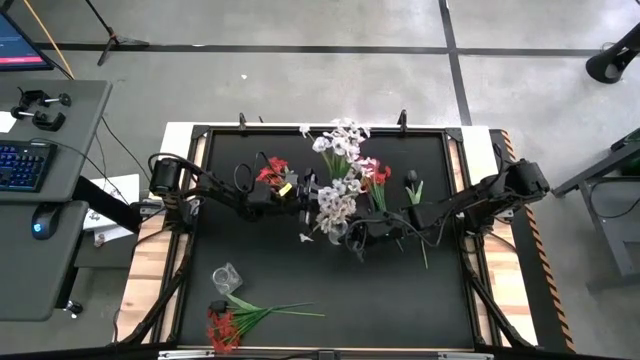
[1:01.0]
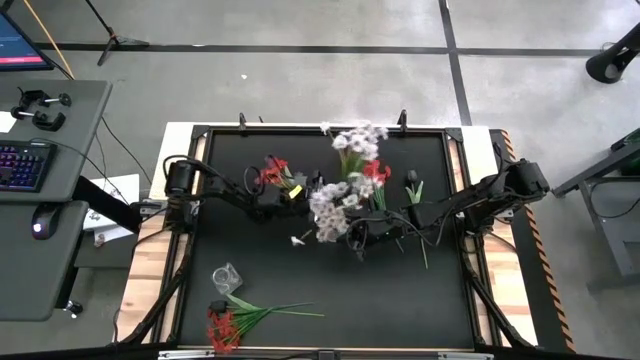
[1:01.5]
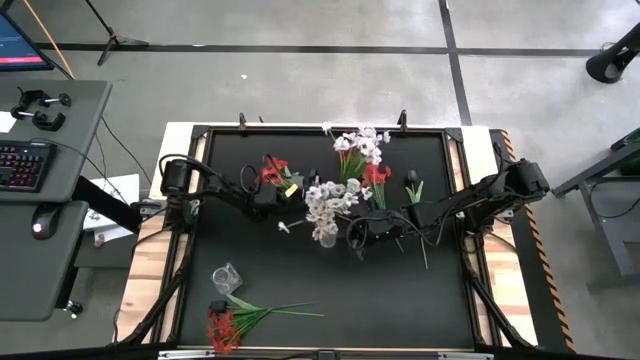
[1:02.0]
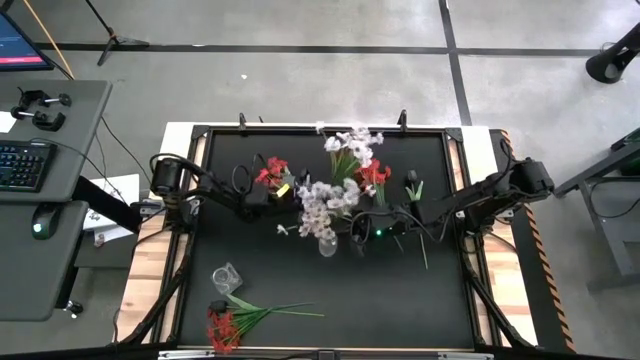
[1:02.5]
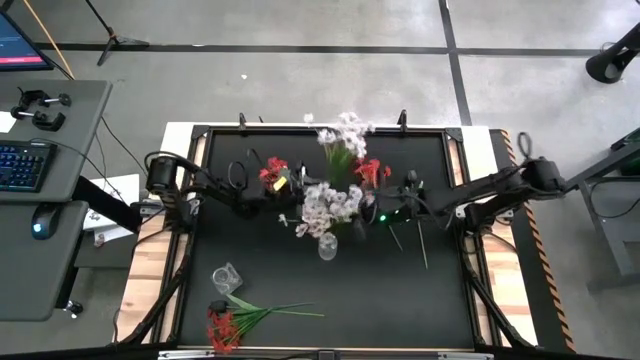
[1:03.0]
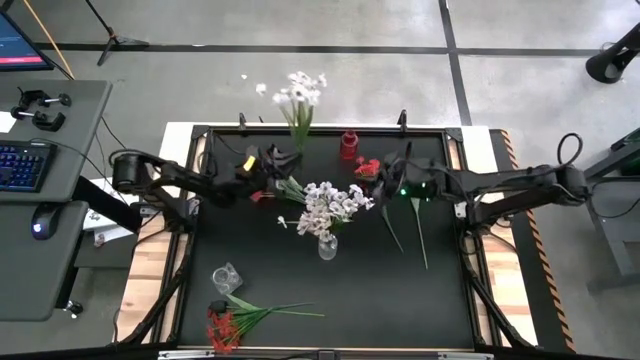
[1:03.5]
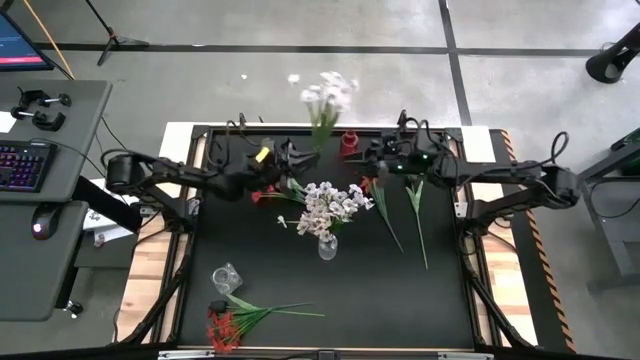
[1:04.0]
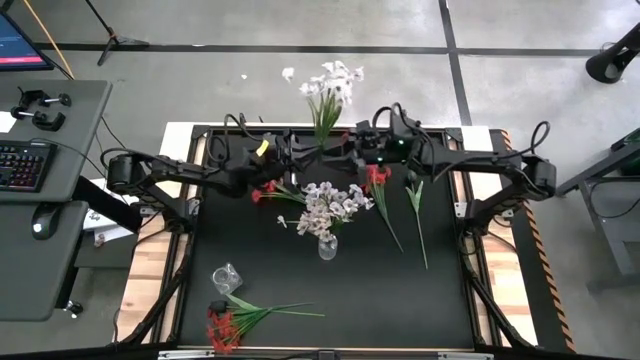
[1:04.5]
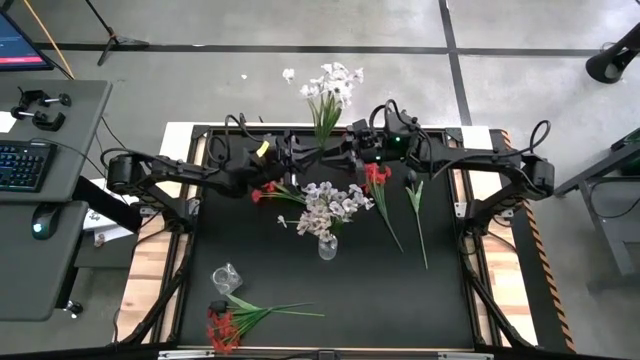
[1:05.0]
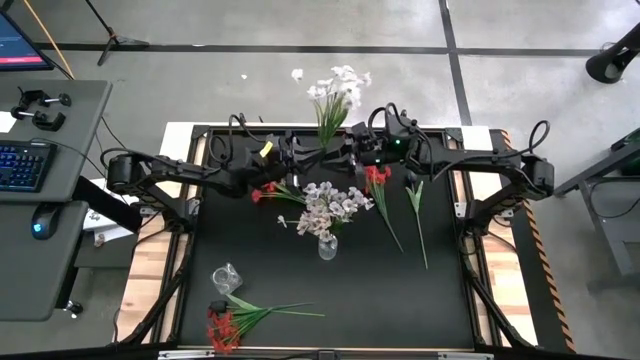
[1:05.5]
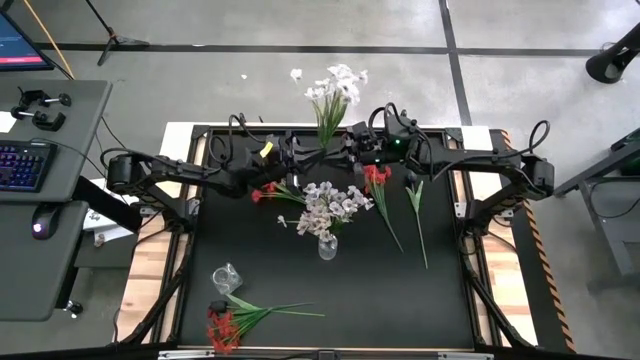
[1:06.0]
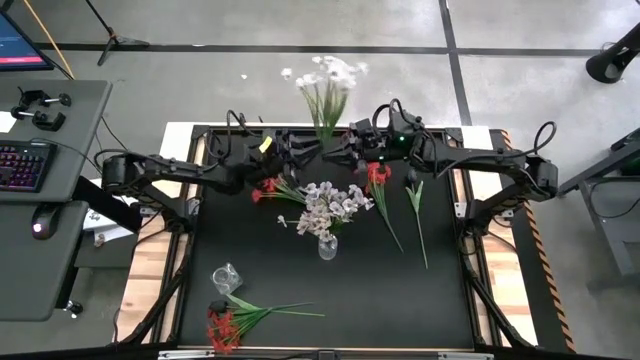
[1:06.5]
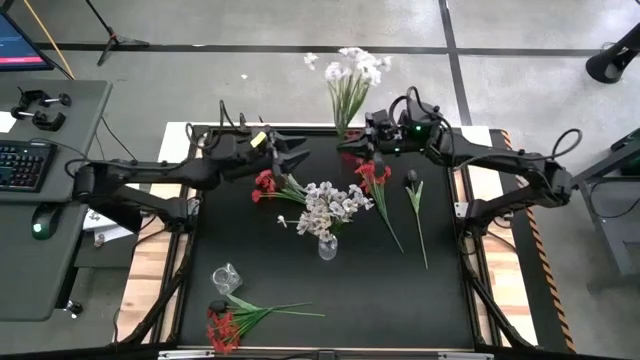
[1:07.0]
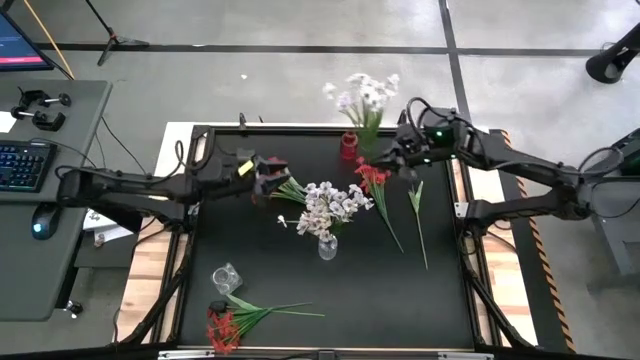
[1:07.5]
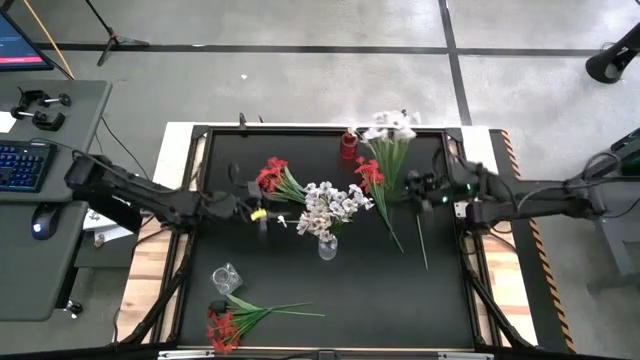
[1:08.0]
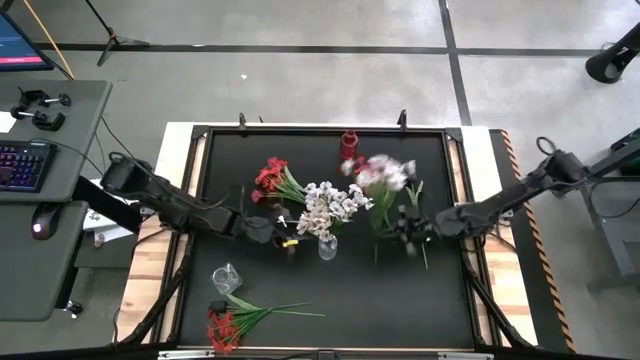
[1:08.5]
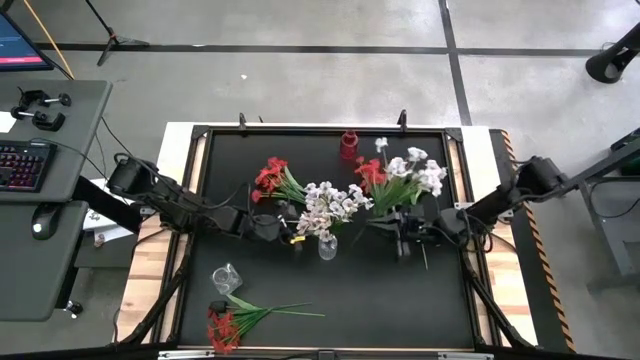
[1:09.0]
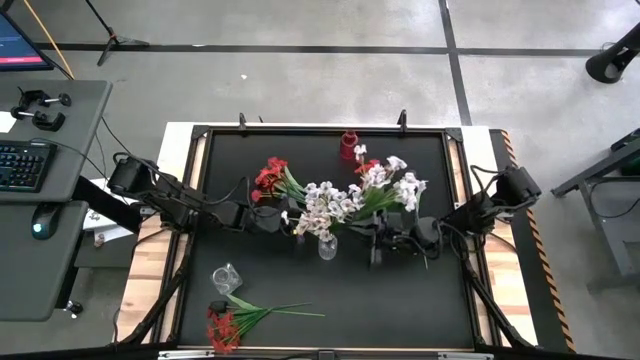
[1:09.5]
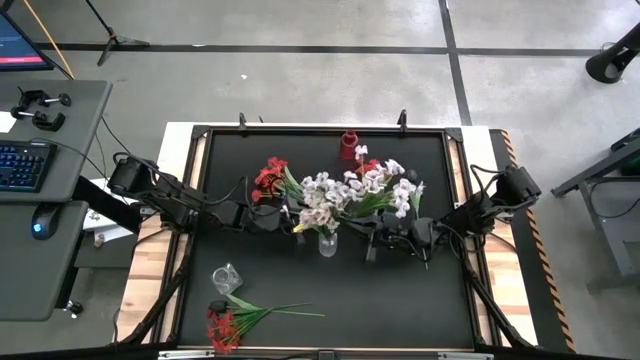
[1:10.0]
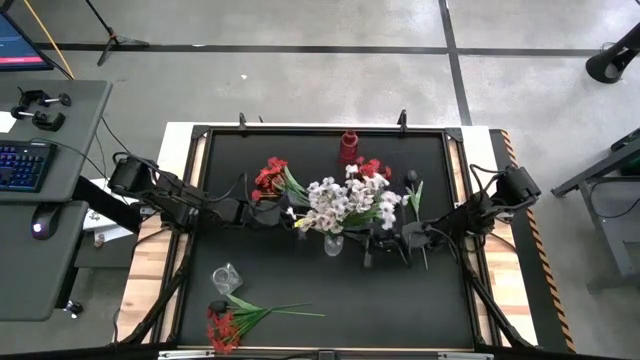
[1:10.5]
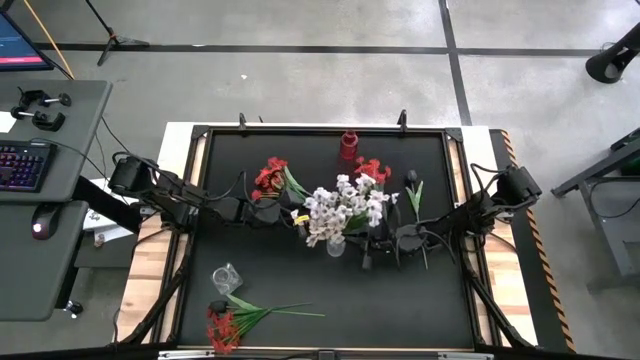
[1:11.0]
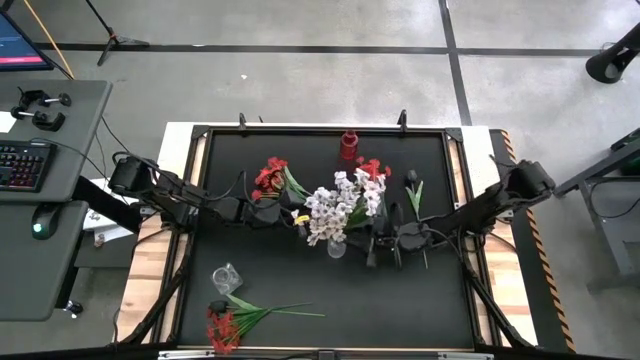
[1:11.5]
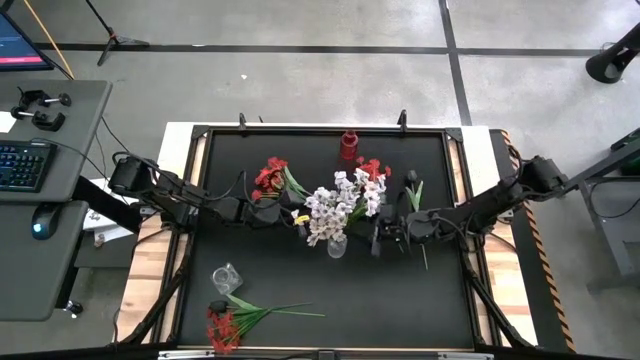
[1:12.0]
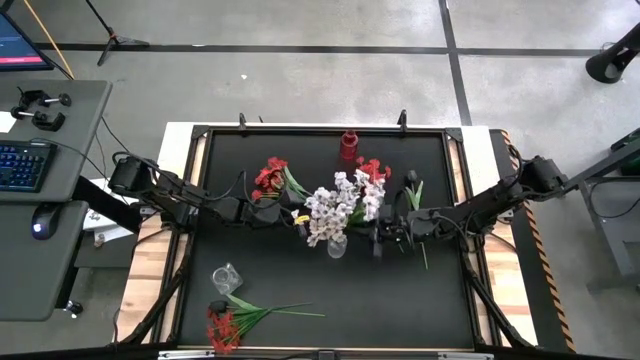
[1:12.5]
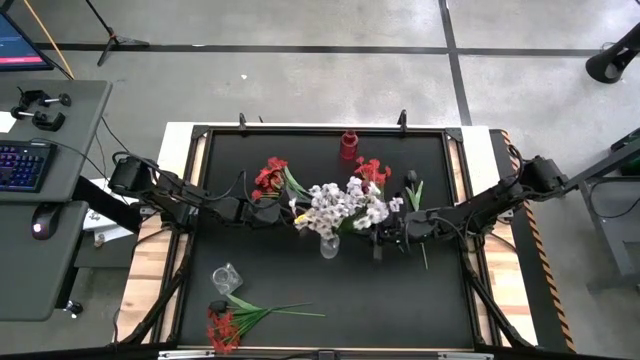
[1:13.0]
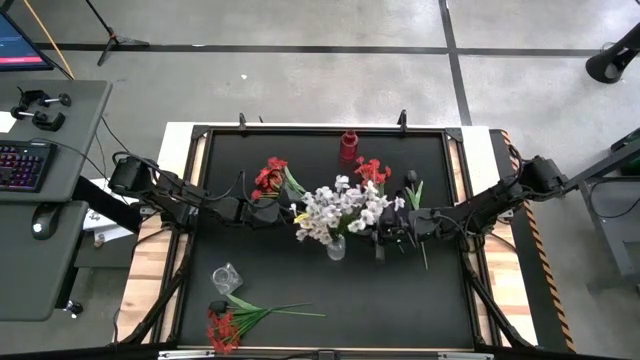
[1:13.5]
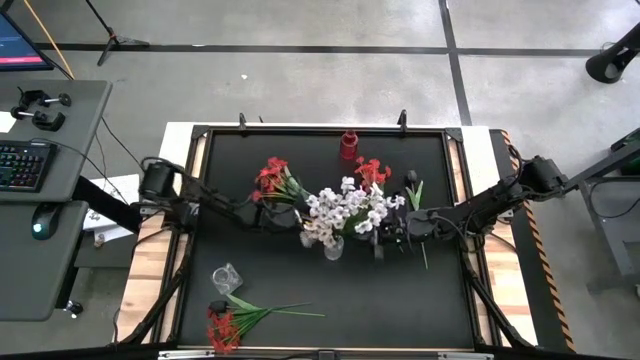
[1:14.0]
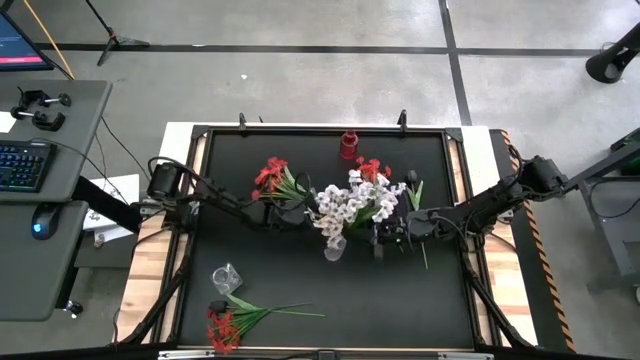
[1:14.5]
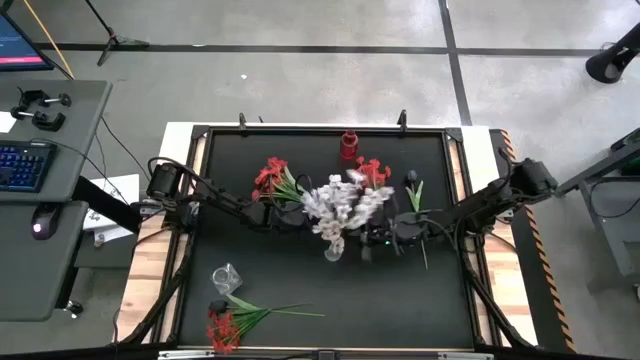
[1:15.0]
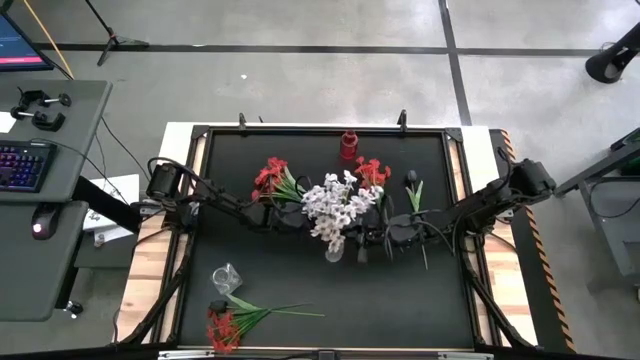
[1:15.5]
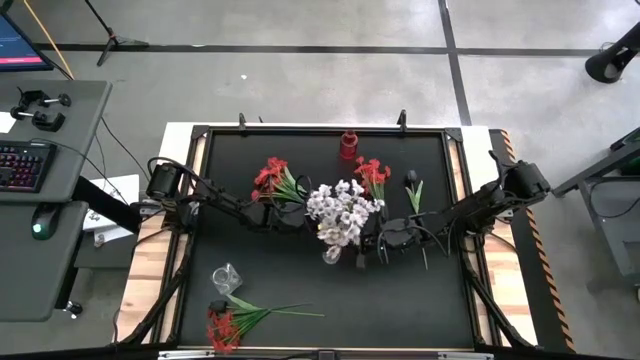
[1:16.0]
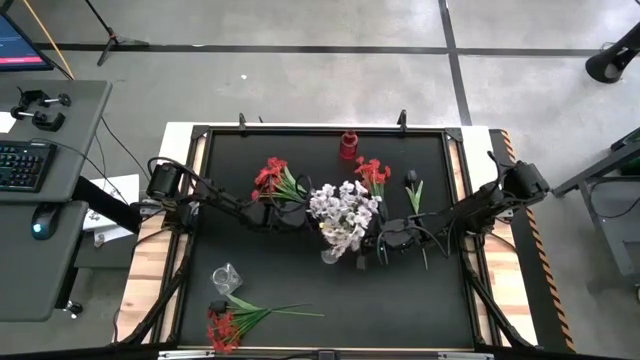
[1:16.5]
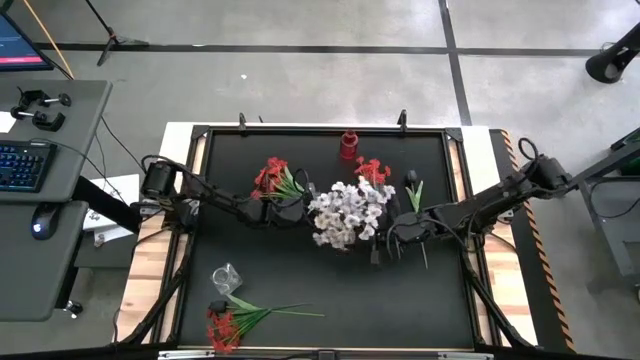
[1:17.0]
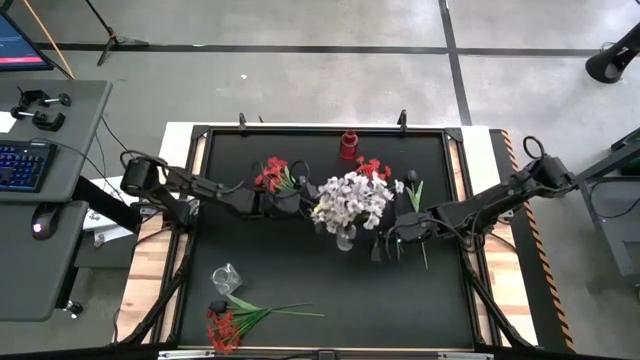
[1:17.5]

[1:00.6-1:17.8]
Task: Sort flowers into vase by color
Put the white flowers into the right transparent vase

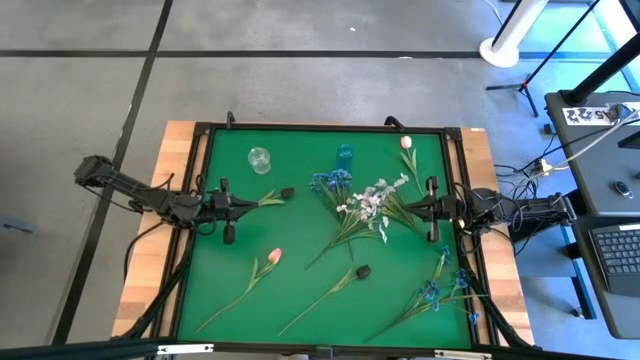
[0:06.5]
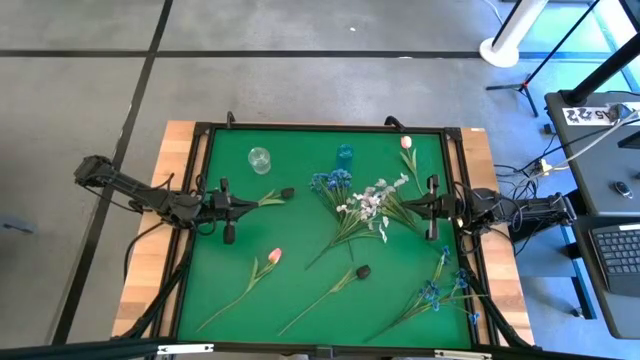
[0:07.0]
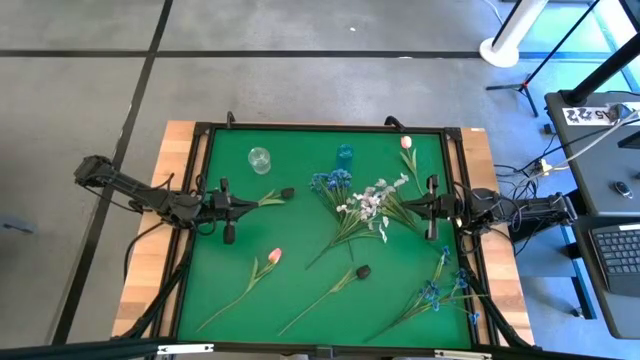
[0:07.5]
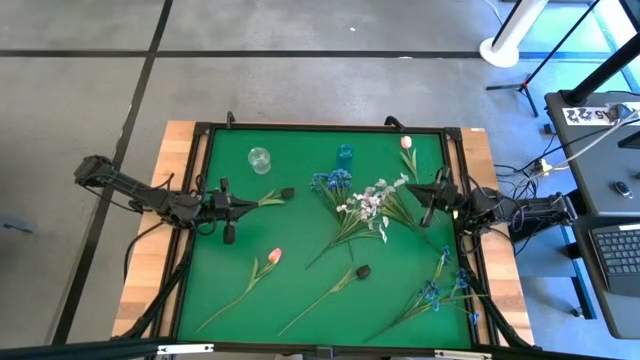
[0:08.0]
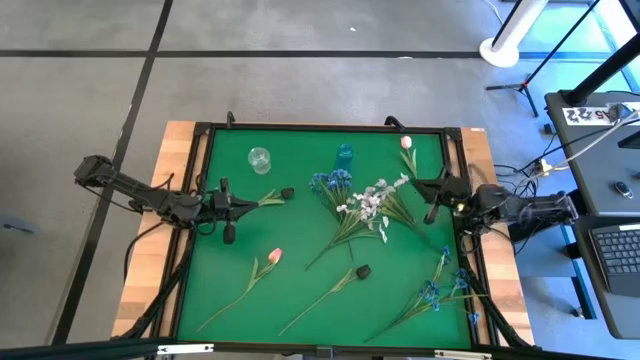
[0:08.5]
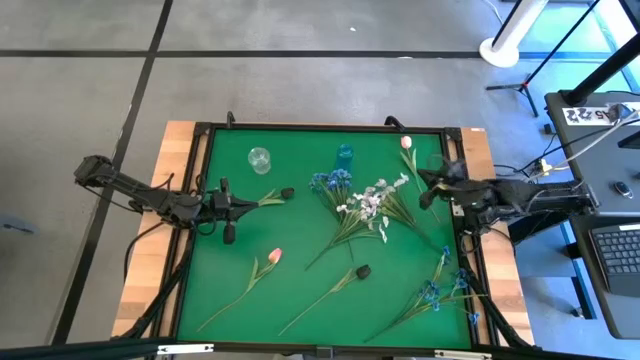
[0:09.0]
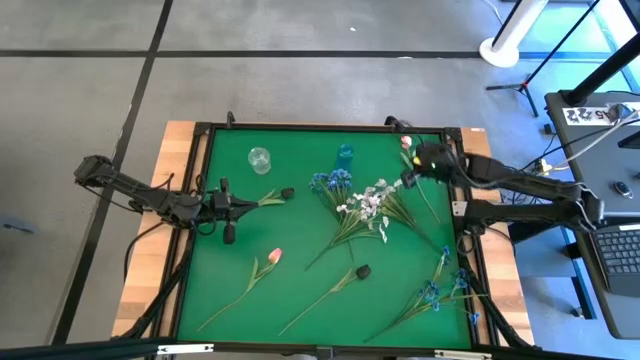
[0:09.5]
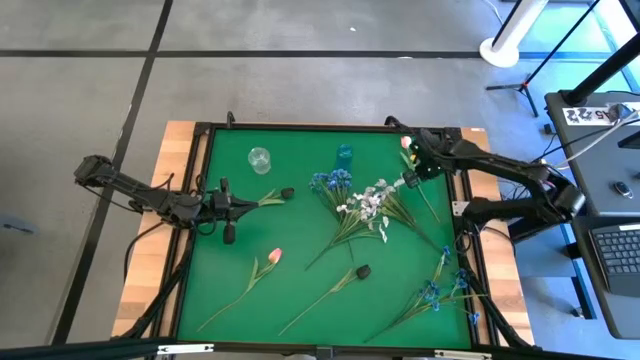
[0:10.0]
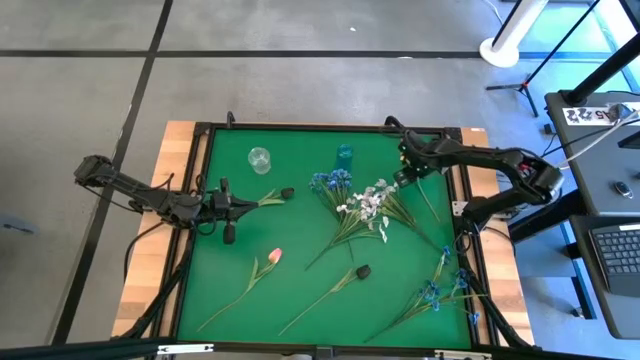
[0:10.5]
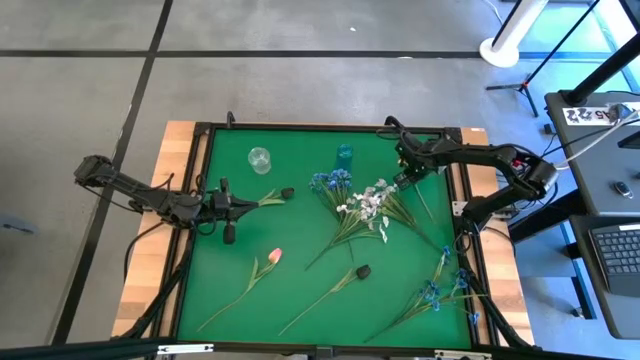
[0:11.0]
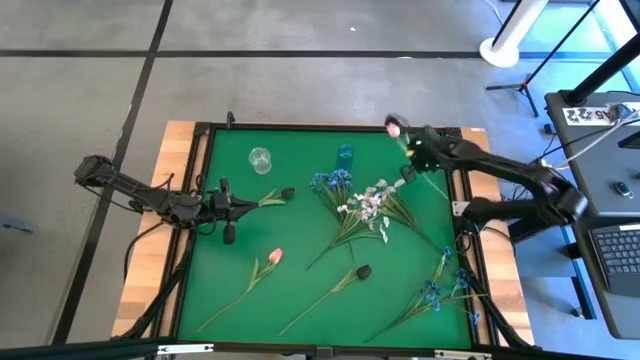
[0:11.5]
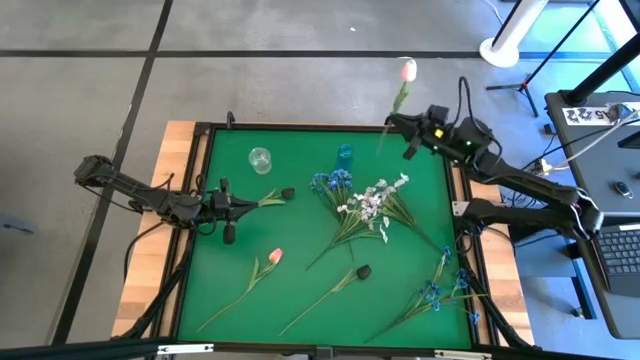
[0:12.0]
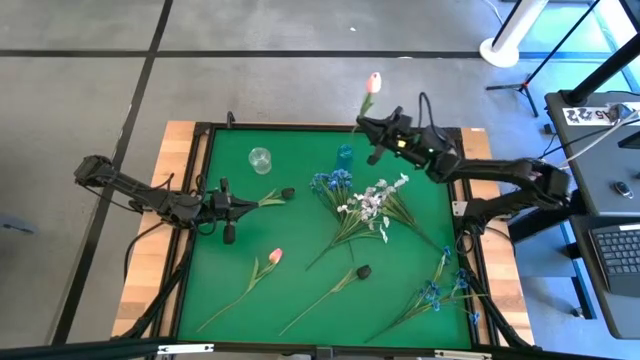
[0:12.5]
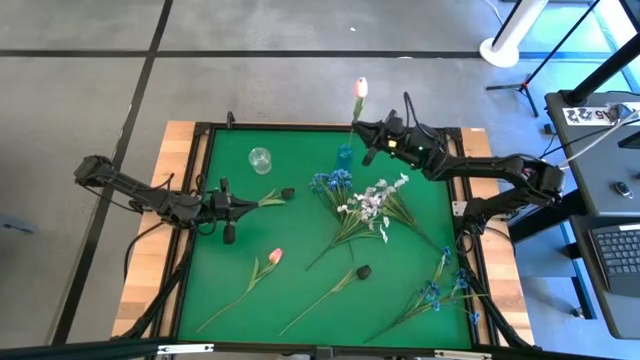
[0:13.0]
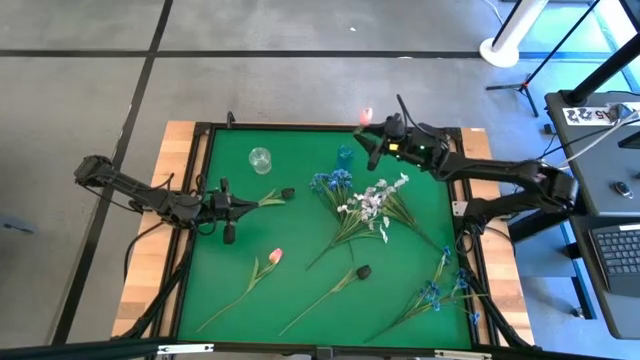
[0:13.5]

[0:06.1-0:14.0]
Task: Sort flowers into vase by color
Put the top pink tulip into the blue vase
